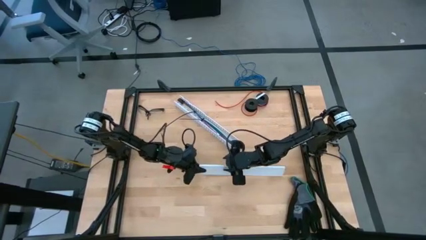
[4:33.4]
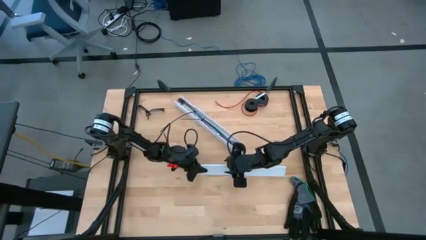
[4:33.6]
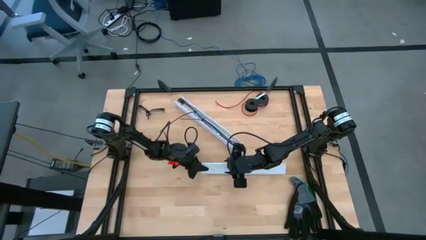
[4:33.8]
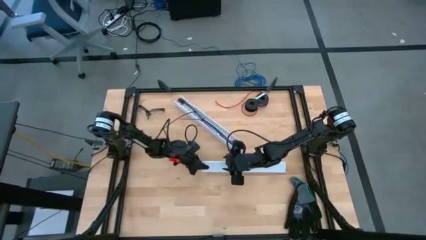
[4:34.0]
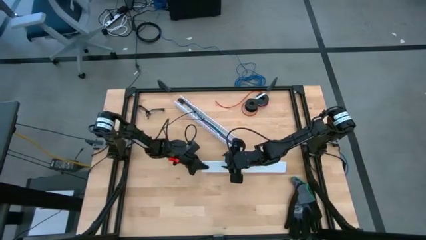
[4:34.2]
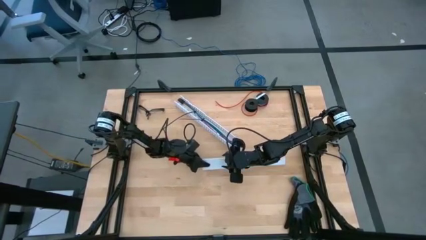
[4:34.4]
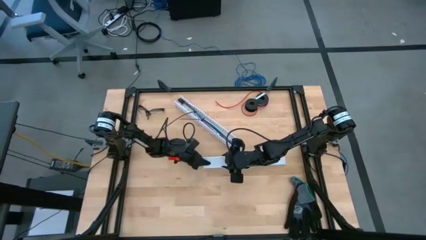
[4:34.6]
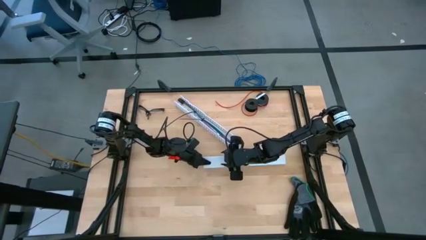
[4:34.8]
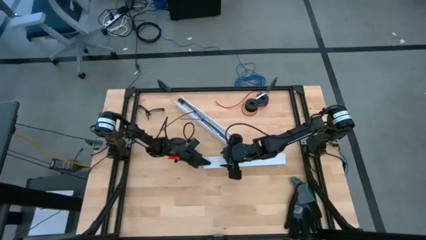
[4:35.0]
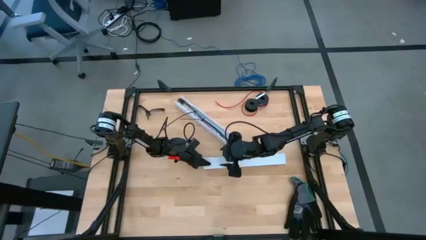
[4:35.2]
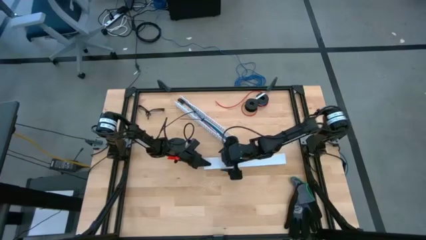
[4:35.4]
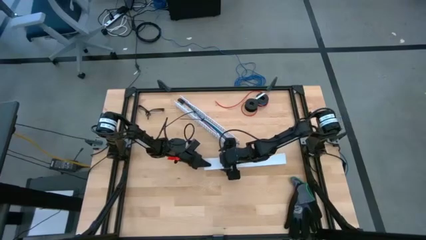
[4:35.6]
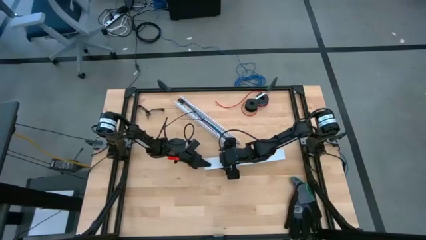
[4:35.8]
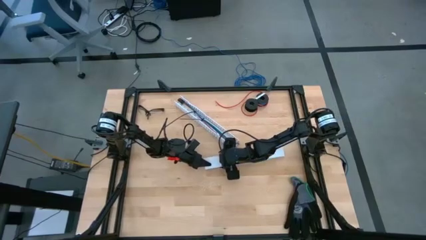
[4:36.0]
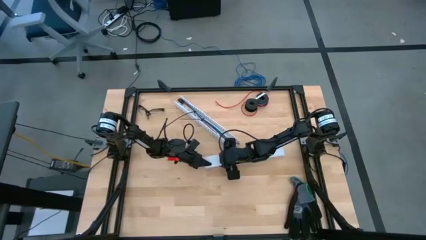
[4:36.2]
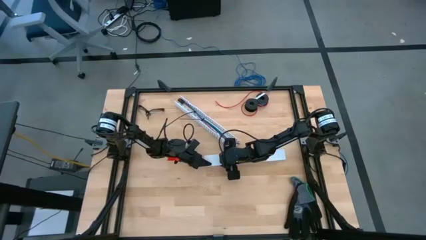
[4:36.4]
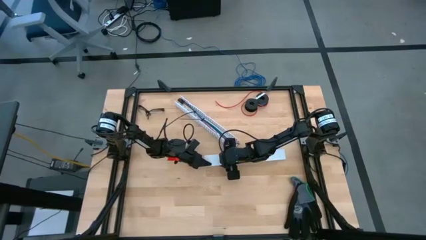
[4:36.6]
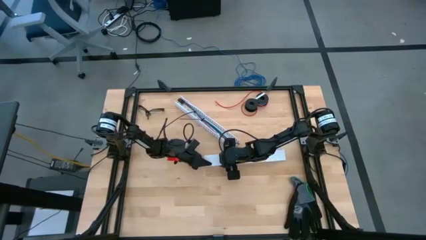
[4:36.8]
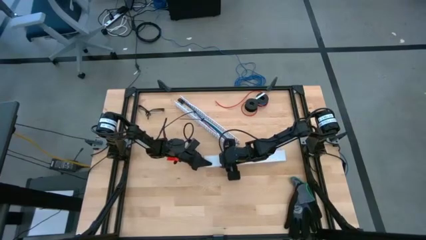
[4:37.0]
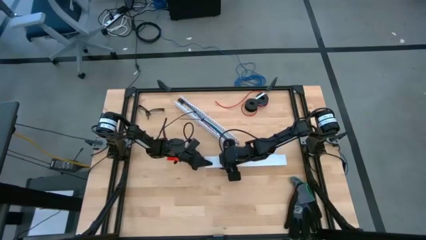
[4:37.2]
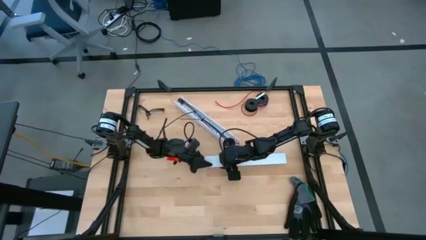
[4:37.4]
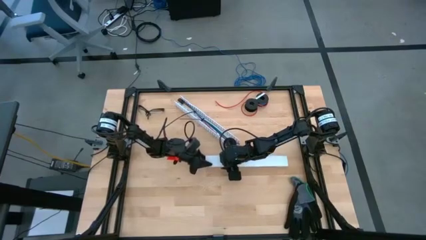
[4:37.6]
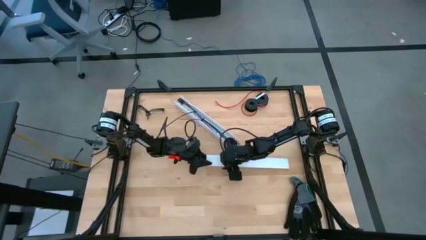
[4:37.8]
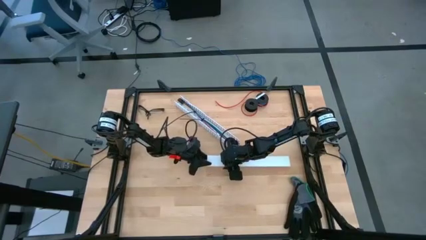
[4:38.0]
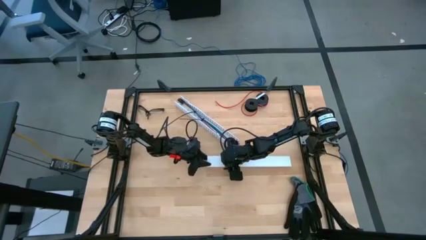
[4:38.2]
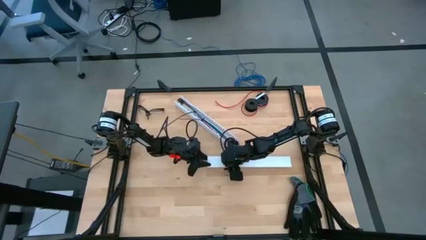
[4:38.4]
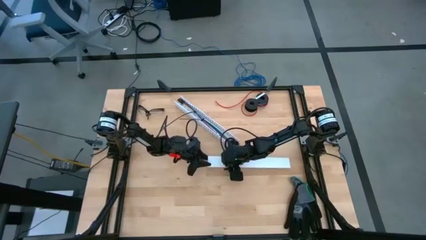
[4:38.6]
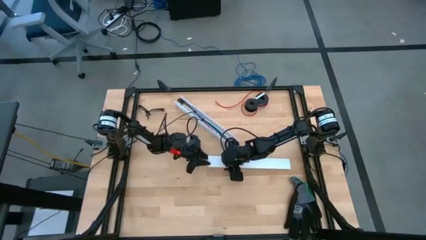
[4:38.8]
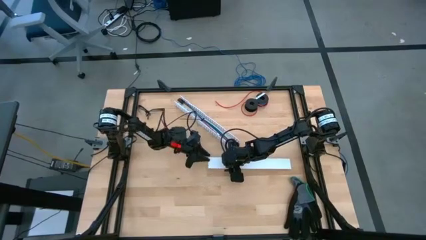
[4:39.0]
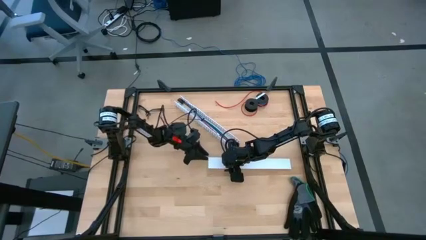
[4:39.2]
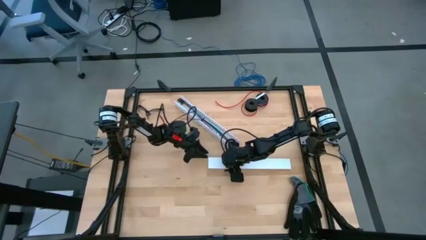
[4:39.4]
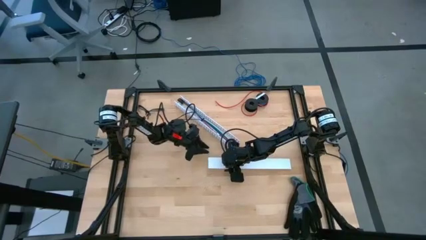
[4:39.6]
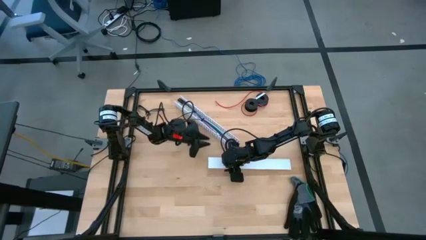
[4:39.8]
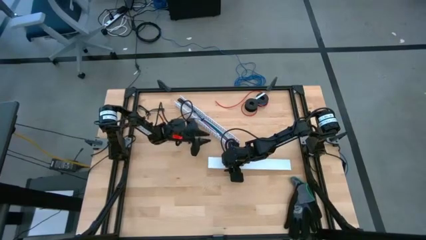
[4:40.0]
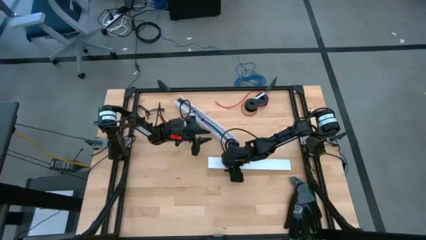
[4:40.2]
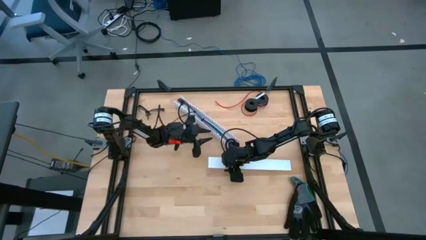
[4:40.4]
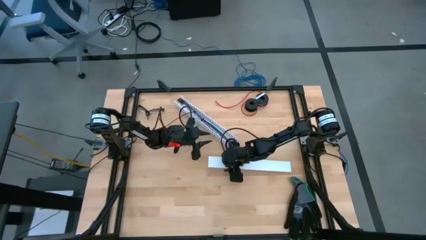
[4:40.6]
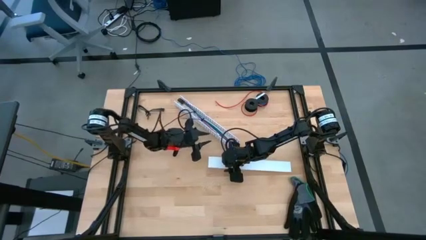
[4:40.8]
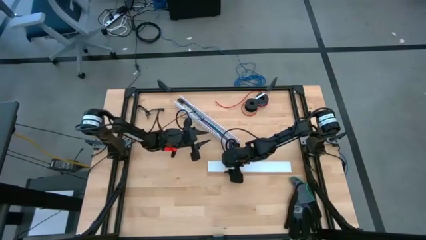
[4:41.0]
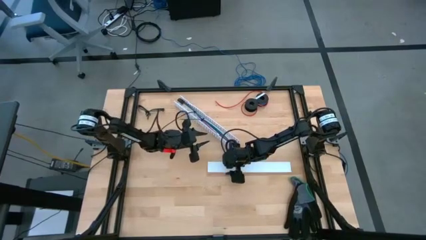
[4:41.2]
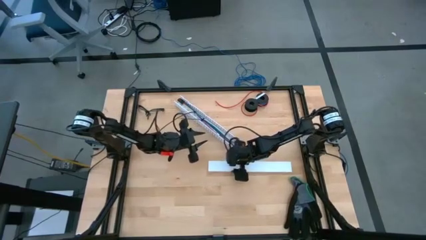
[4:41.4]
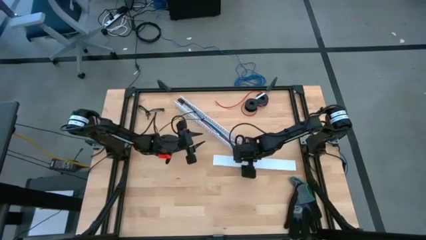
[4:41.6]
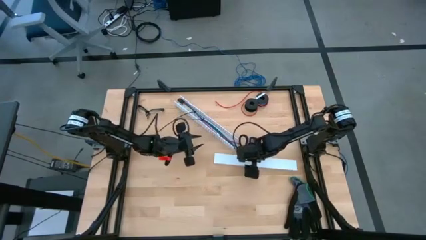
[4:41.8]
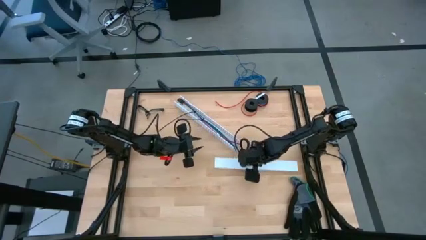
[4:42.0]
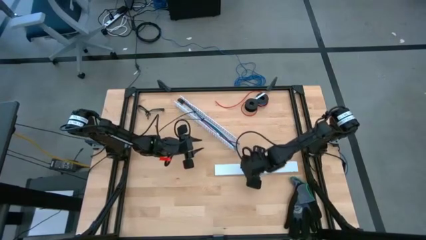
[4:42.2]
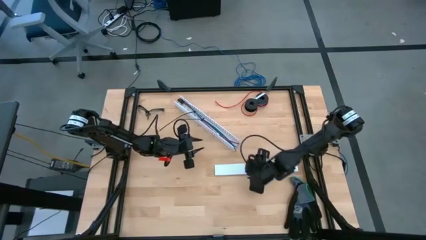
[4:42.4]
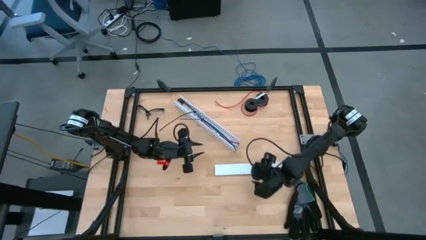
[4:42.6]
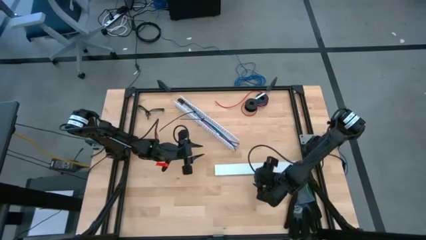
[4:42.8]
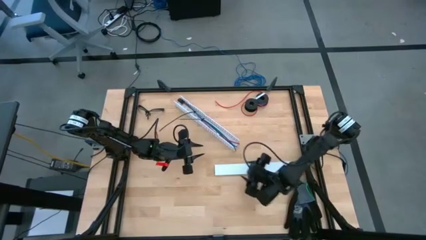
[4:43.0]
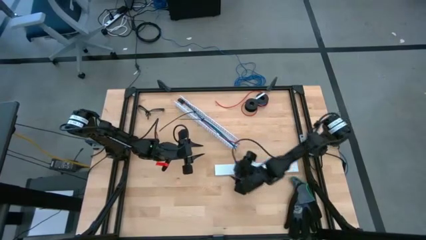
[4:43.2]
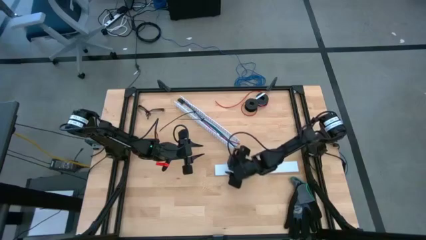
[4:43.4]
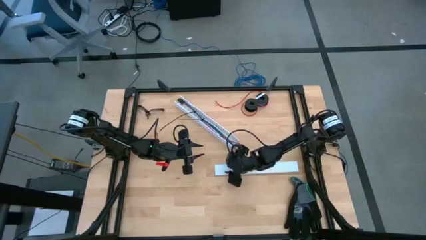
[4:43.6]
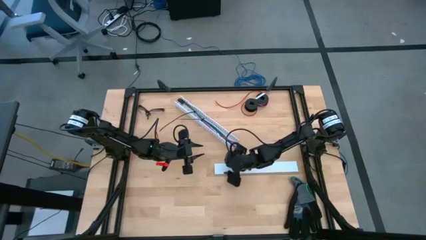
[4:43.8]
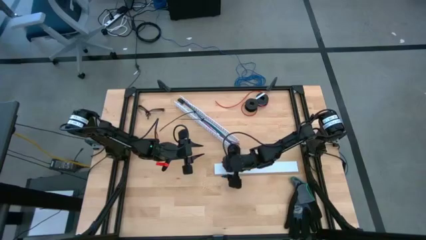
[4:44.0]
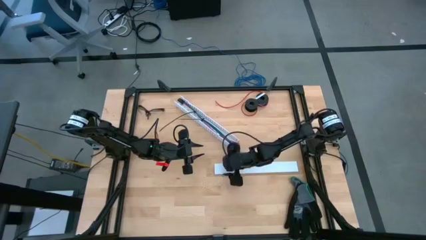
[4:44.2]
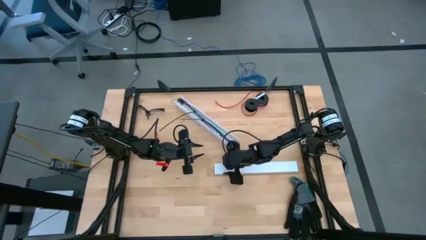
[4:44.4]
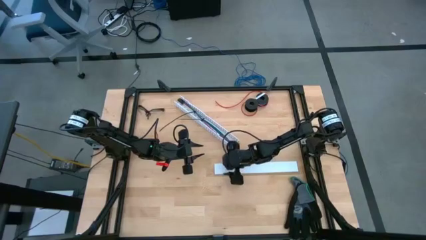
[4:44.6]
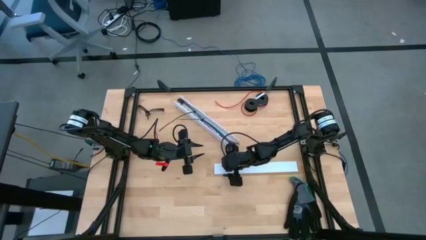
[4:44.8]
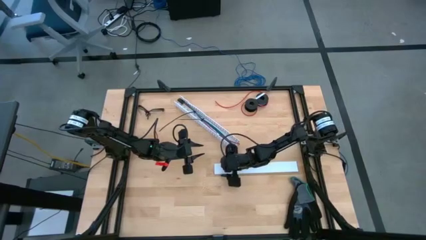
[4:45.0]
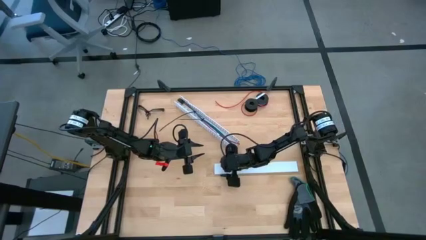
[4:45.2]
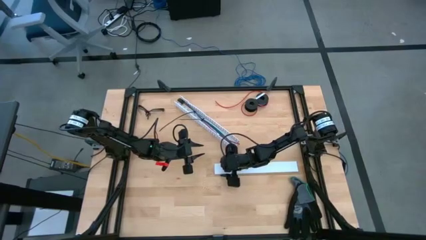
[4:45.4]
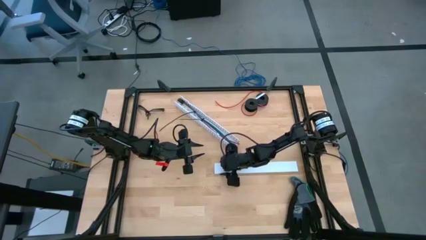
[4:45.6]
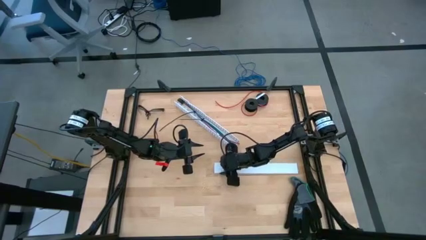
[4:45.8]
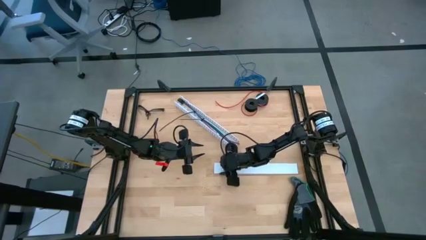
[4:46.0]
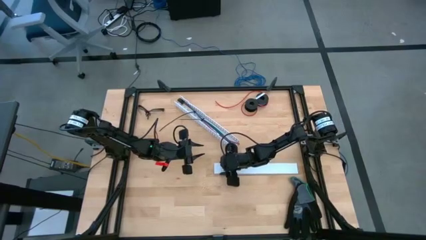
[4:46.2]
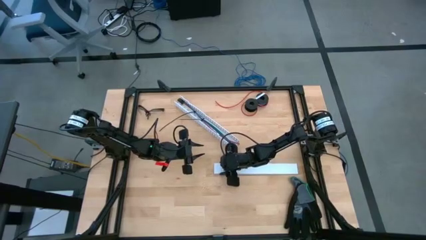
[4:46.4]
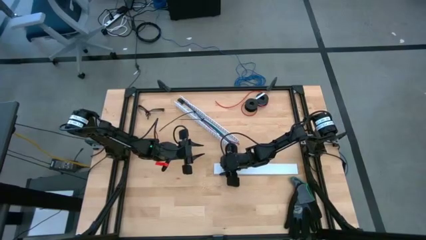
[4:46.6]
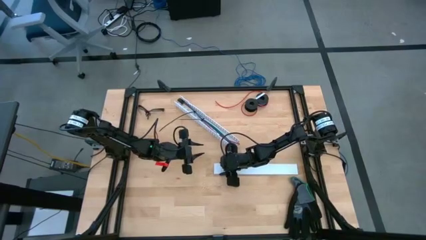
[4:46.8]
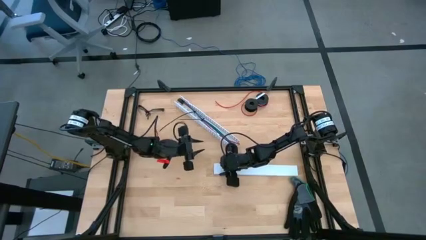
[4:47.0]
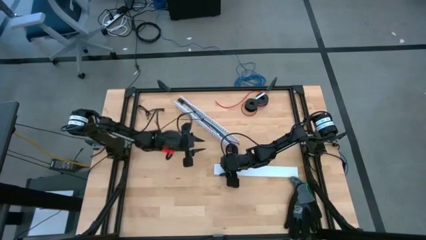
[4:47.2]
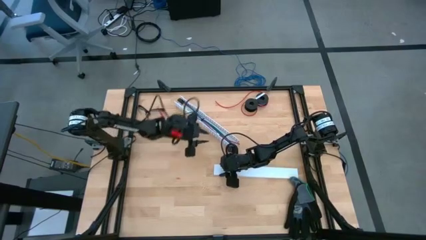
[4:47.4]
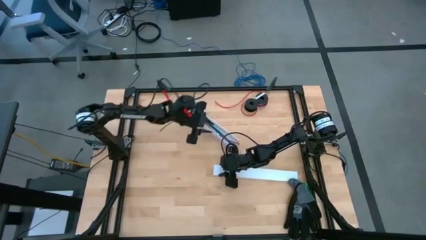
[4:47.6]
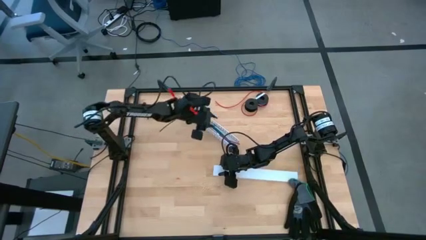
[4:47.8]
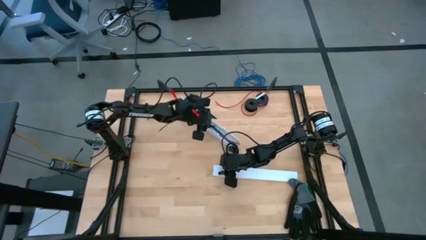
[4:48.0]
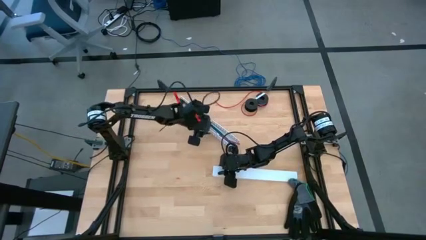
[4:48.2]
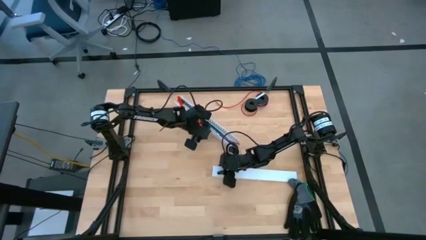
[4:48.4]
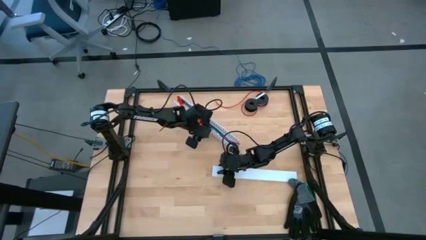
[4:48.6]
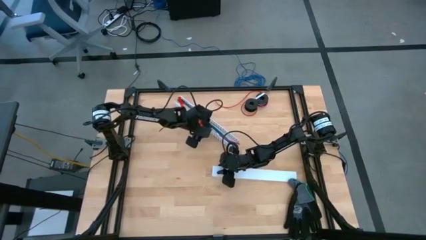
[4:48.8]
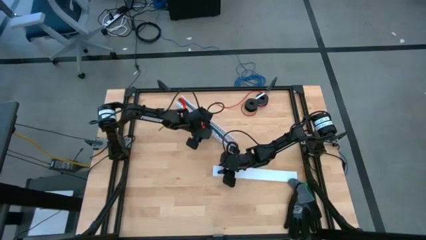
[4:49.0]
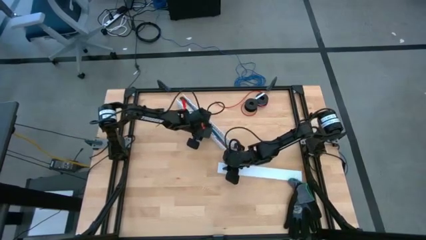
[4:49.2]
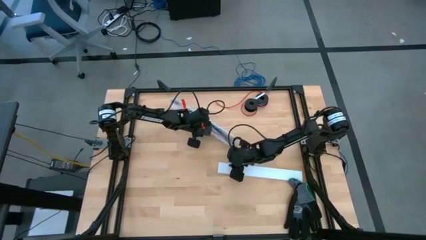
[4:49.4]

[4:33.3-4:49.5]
Task: Ziptie cables
Close the white cable duct
